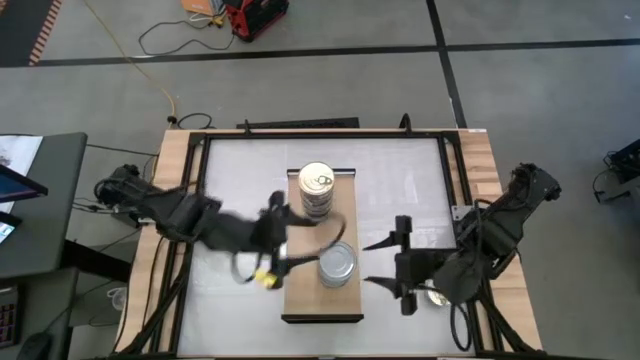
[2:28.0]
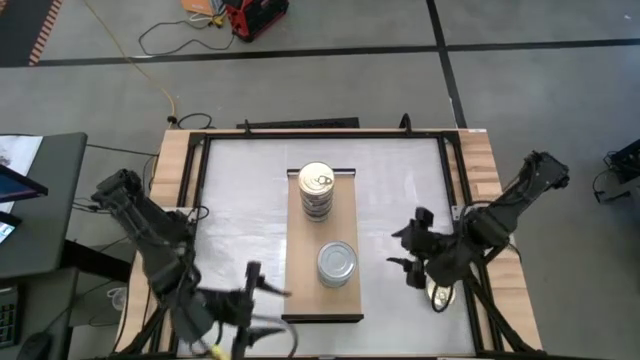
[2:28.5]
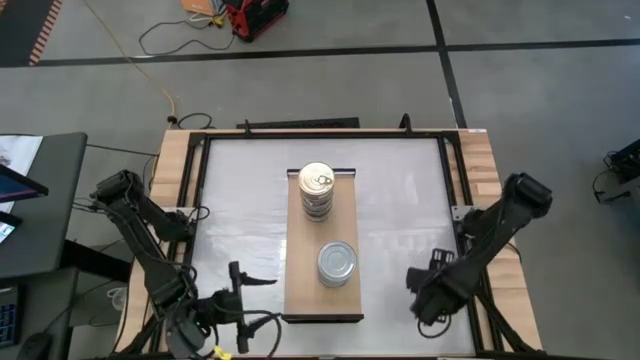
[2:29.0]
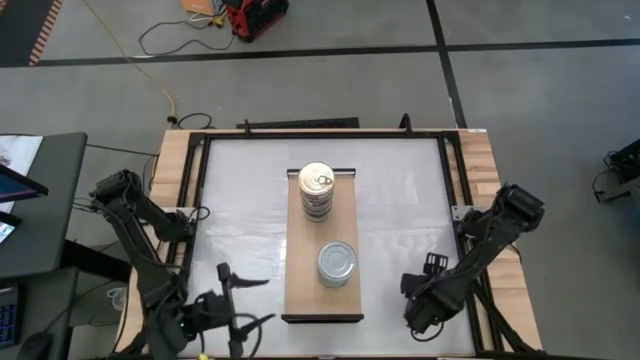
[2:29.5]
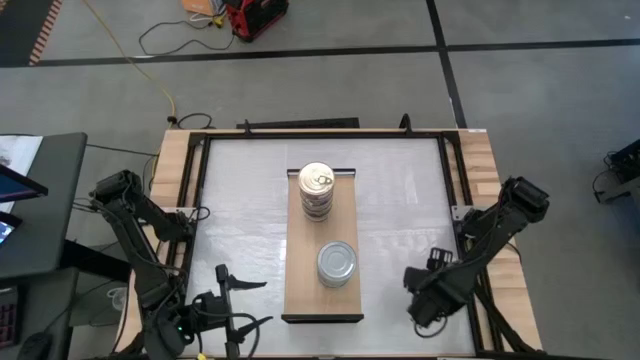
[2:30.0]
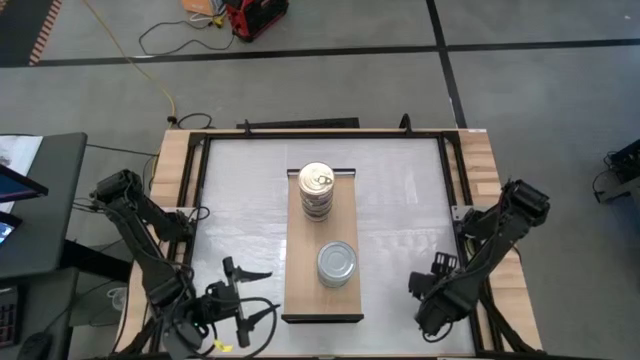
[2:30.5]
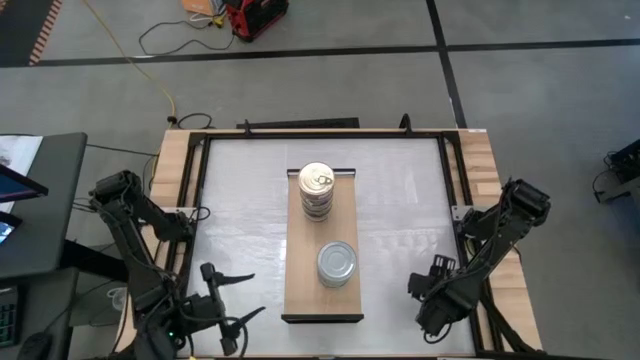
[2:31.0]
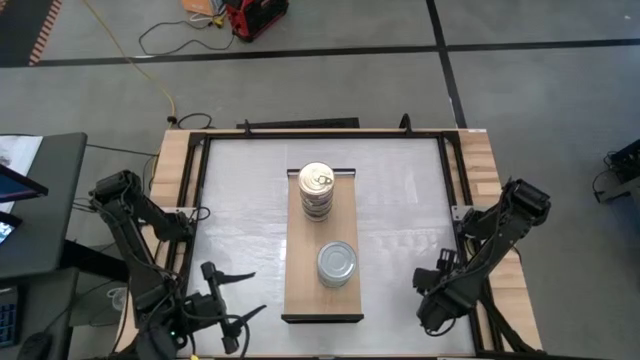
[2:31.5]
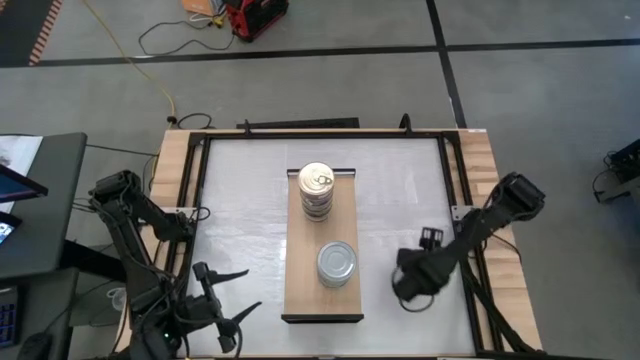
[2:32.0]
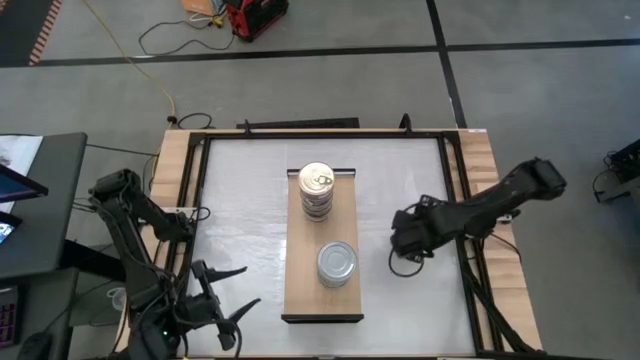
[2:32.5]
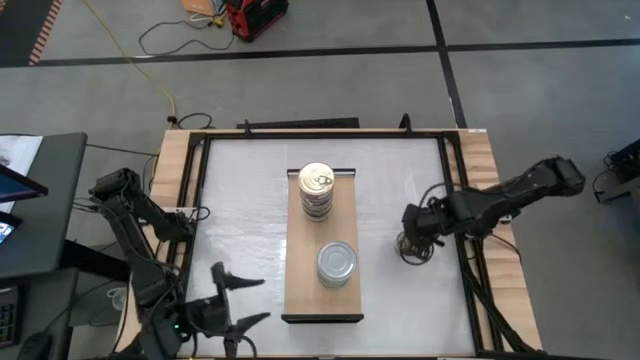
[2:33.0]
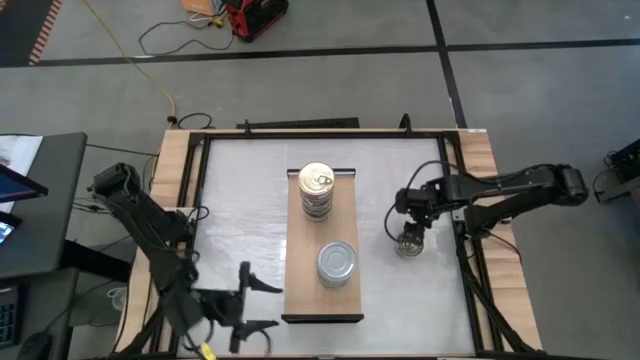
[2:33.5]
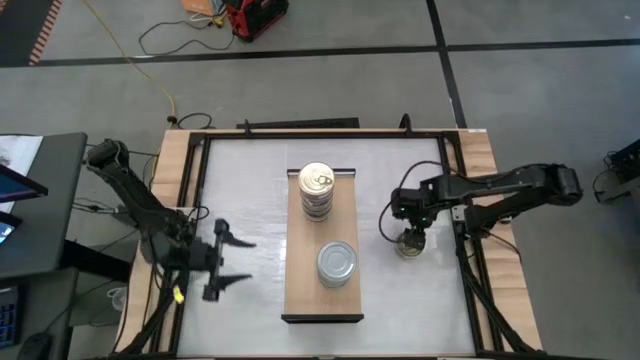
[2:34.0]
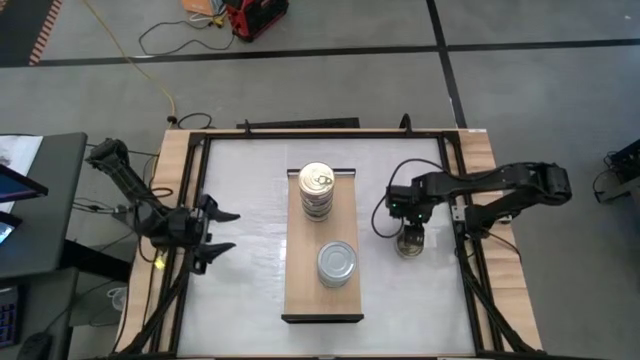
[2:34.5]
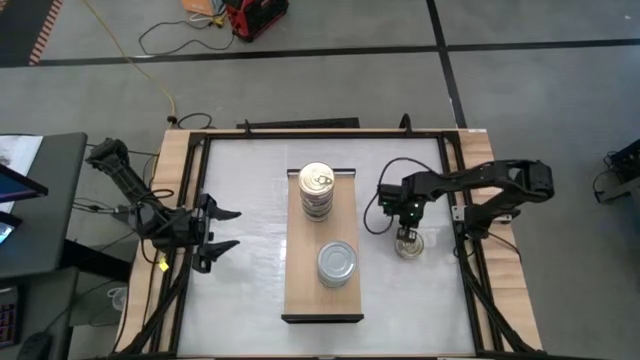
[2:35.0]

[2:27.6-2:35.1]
Task: Stack canned seafood by type on shelf
Stack the blue tuna can on top of the stacked blue tuna cans on the shelf

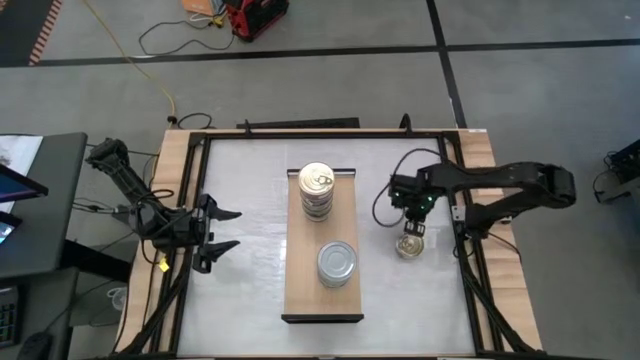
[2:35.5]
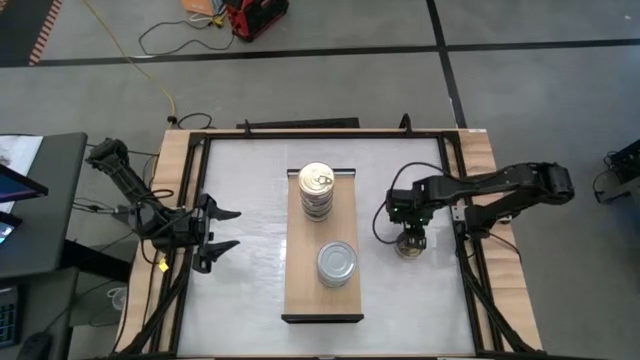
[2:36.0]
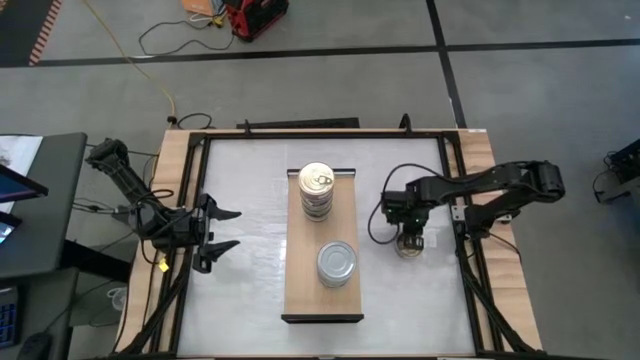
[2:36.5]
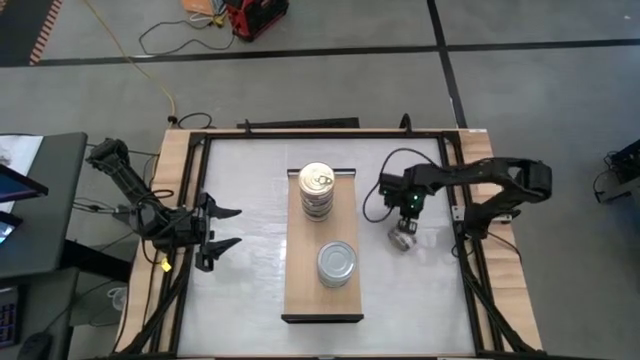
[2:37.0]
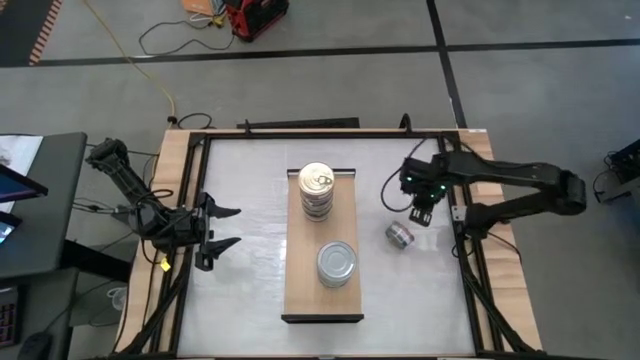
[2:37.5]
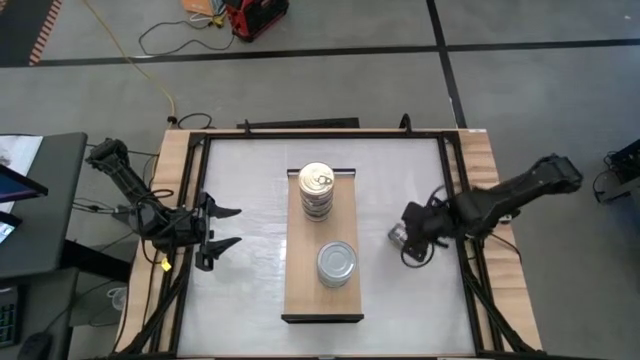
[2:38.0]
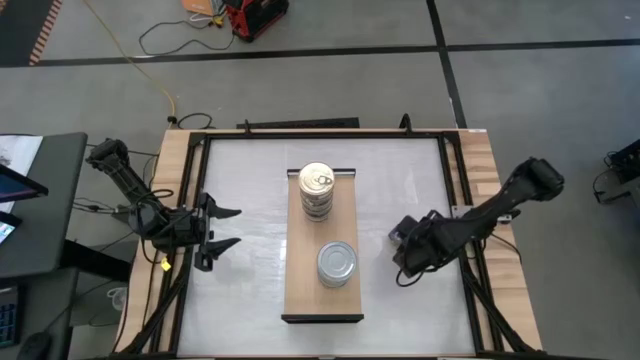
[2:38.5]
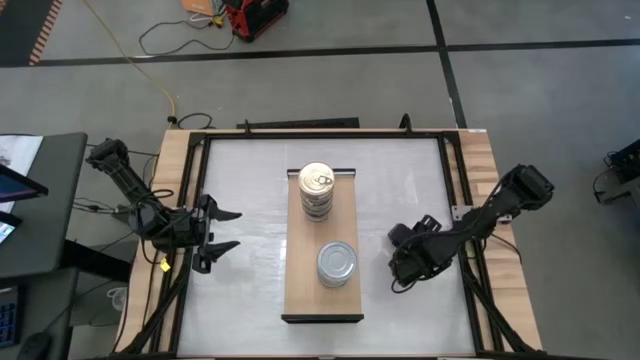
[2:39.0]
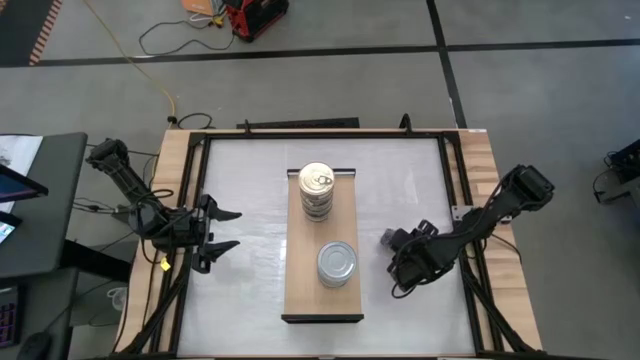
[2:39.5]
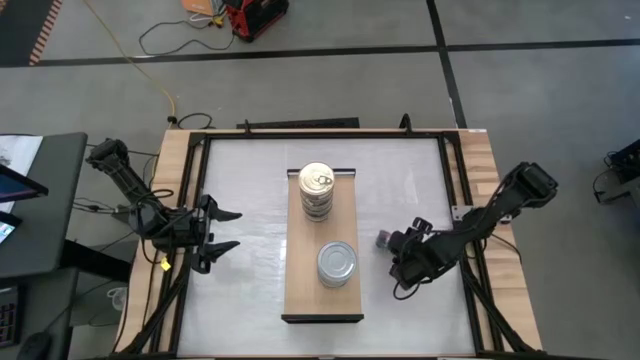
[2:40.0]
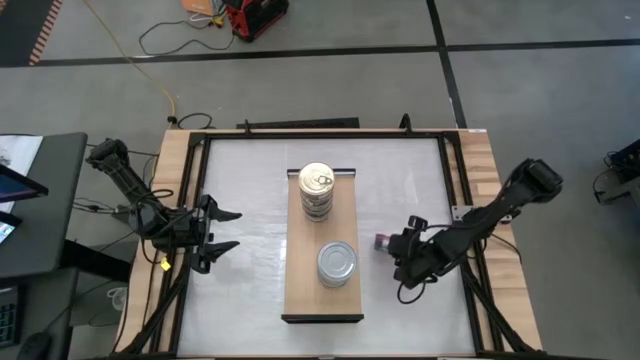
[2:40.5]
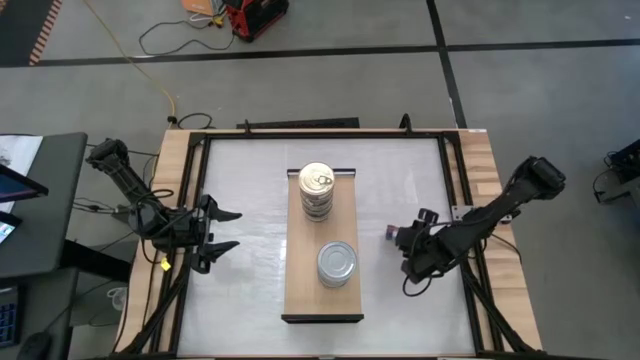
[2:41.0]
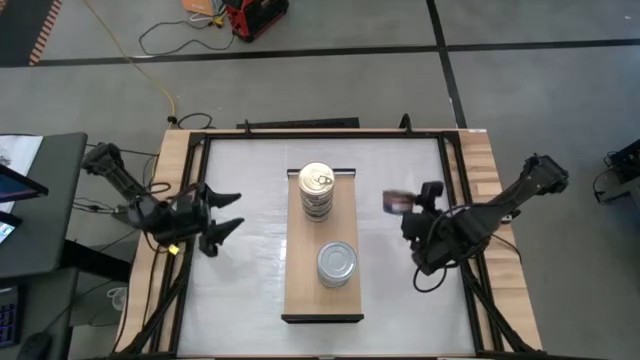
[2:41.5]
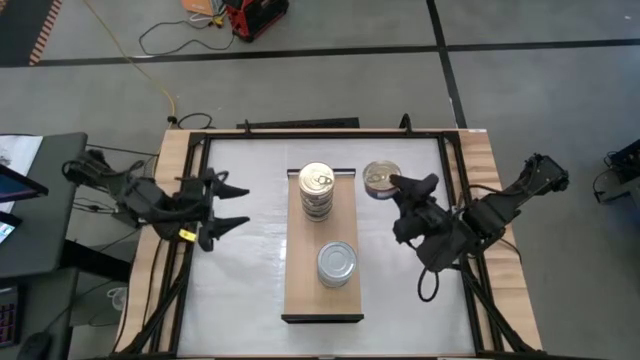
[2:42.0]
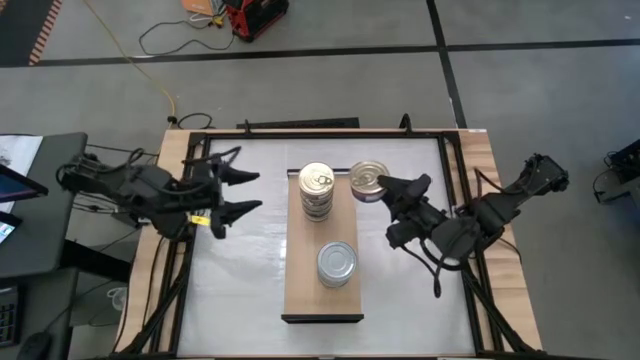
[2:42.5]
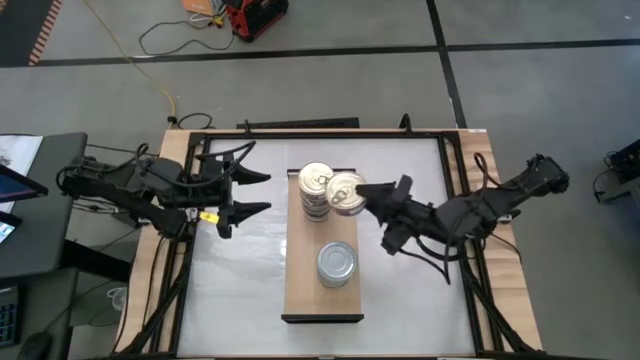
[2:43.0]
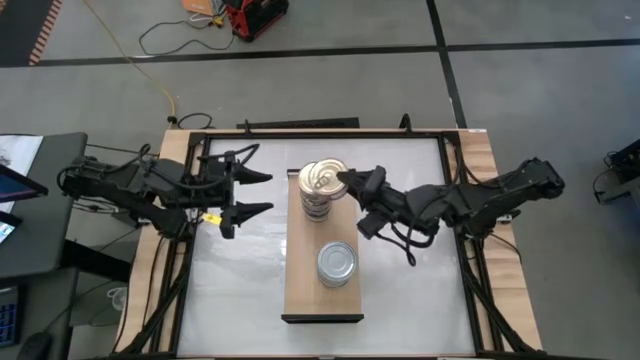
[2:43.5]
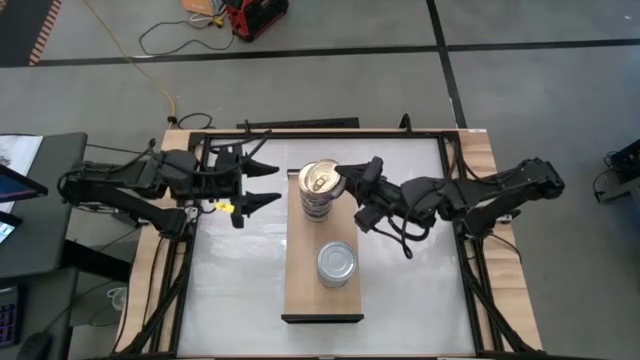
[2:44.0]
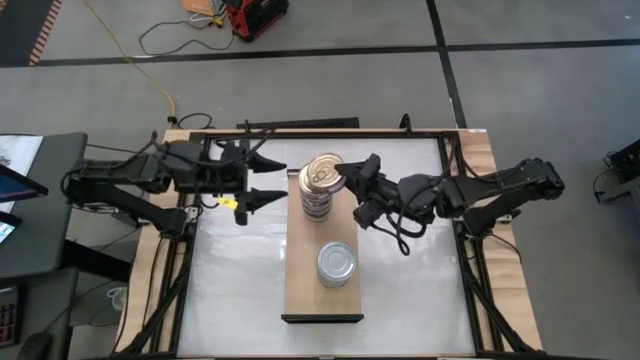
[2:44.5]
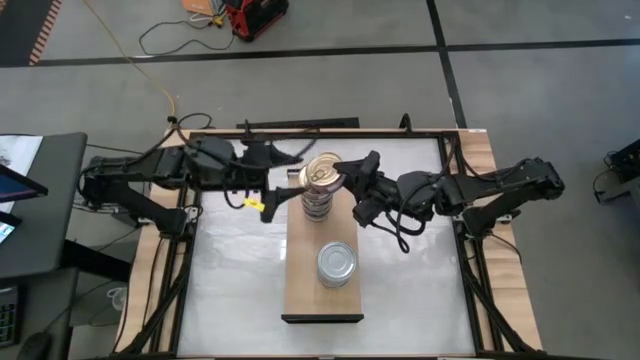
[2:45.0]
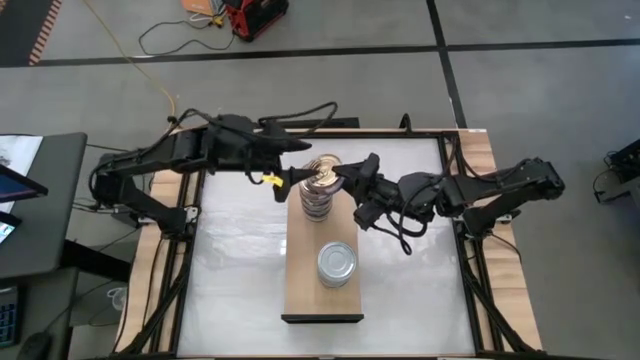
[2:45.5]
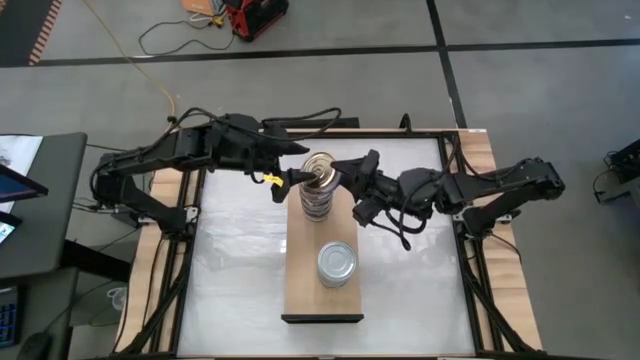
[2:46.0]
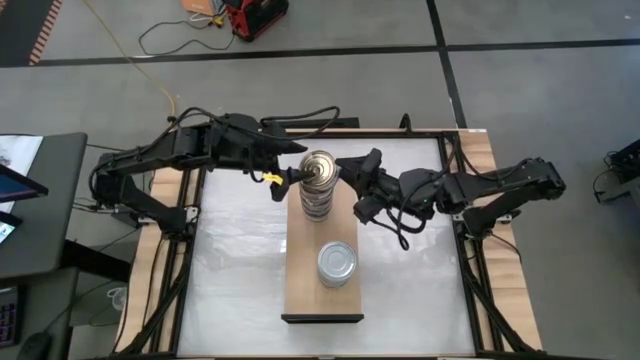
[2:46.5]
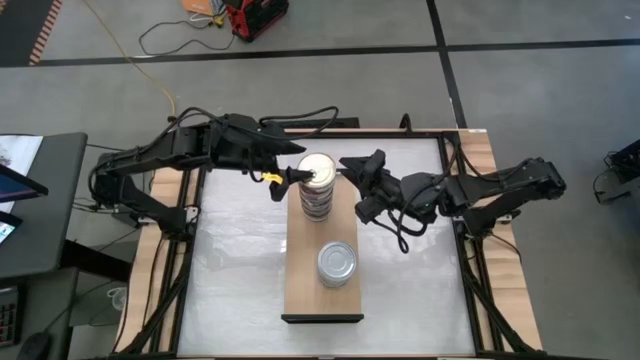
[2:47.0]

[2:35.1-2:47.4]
Stack the blue tuna can on top of the stacked blue tuna cans on the shelf

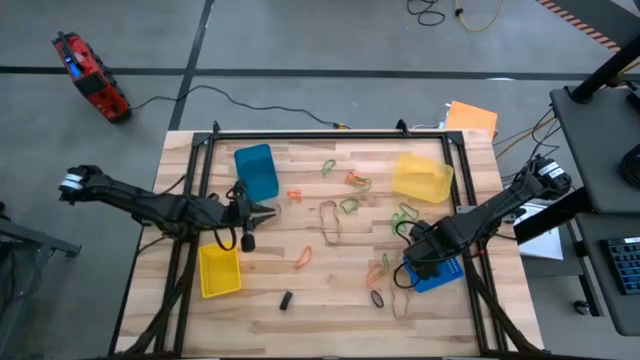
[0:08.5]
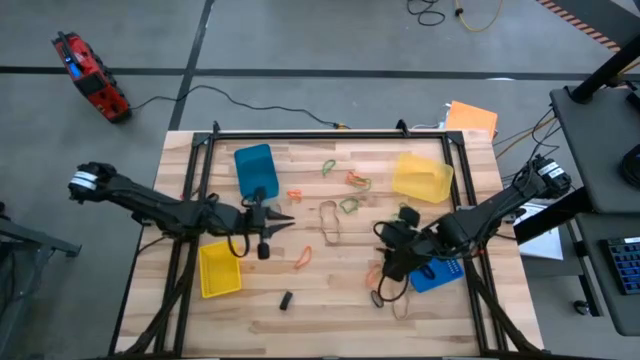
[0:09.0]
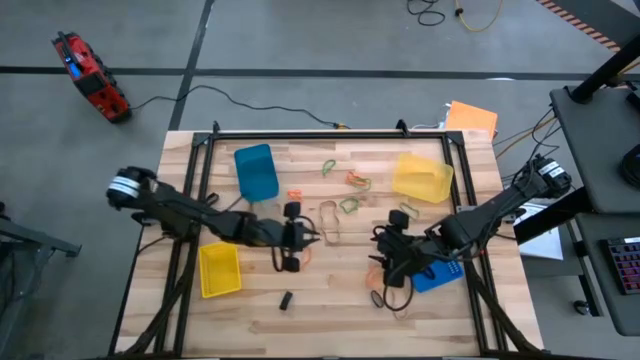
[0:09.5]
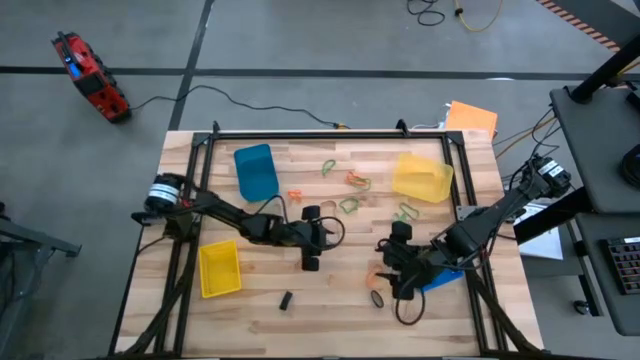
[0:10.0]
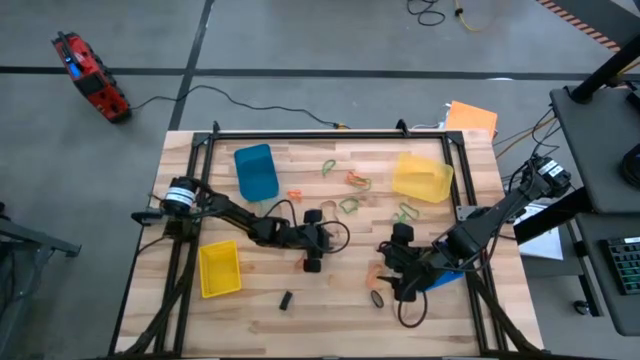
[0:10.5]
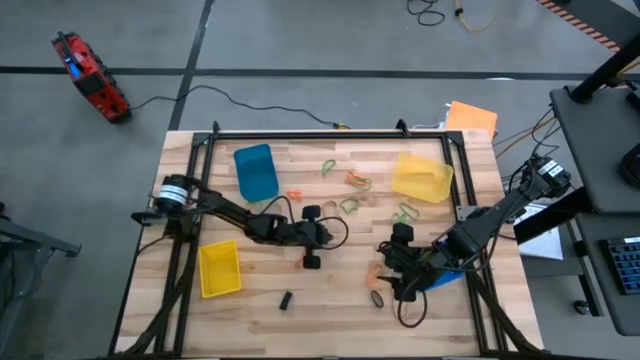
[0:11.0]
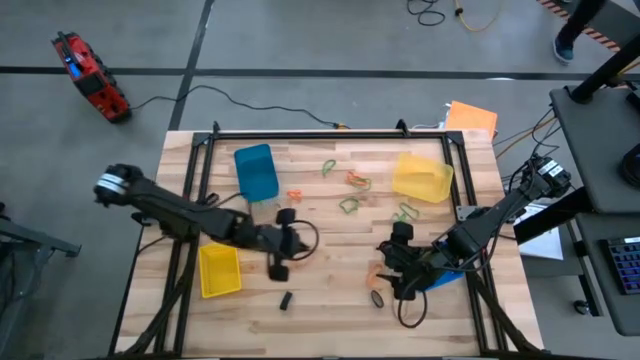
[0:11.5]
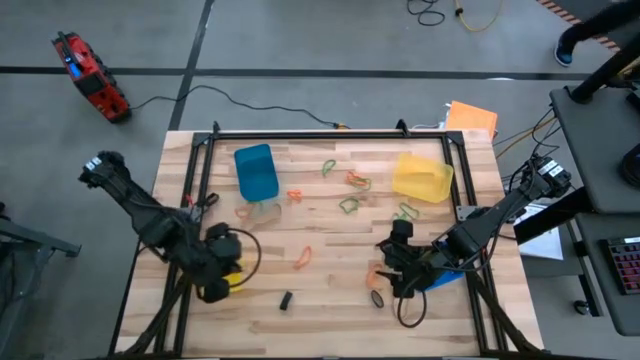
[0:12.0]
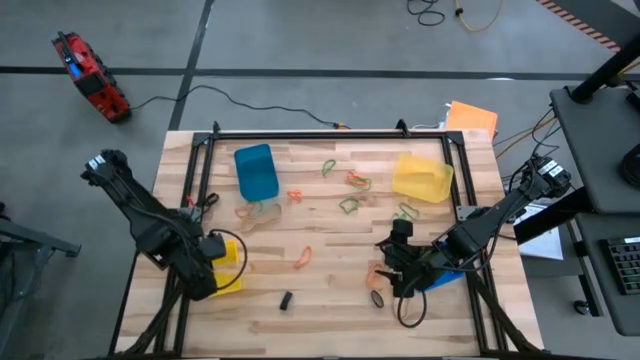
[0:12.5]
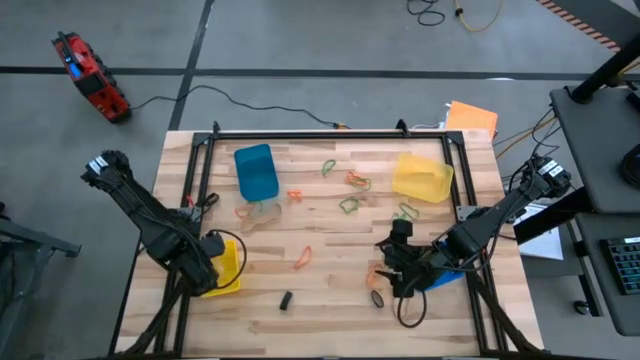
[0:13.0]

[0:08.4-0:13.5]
Task: Sort rubber bands into baskets
Put the brown rubber band into the bottom yellow bin
